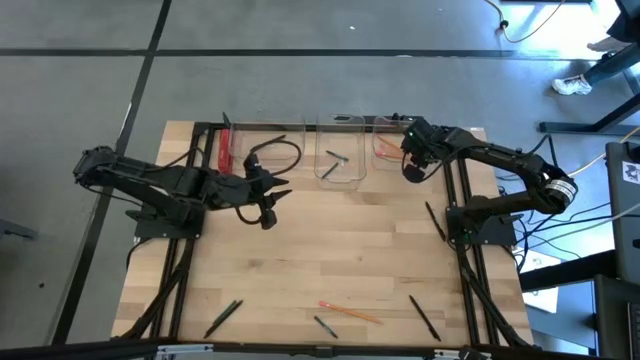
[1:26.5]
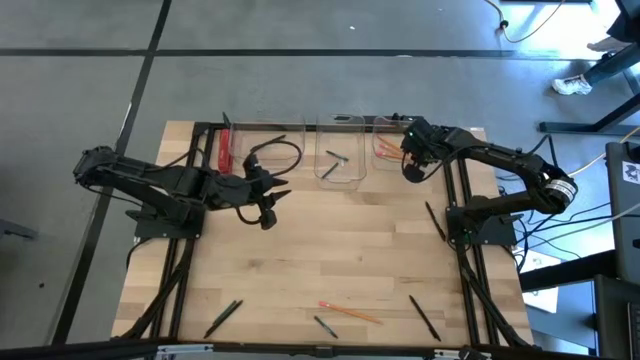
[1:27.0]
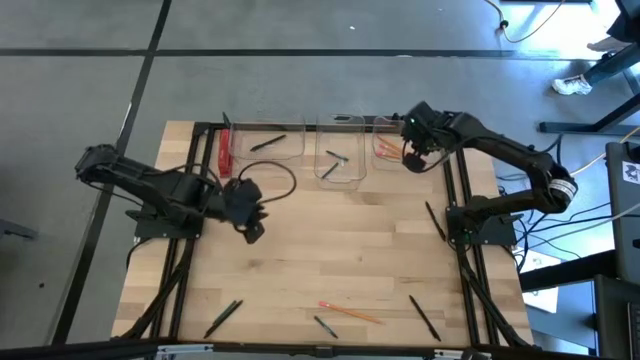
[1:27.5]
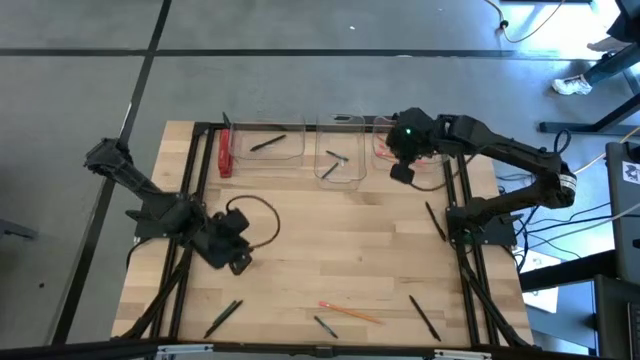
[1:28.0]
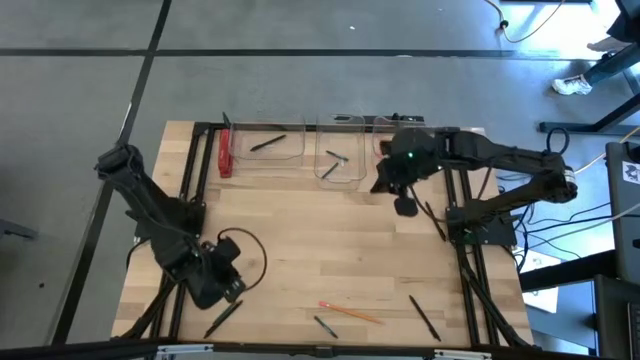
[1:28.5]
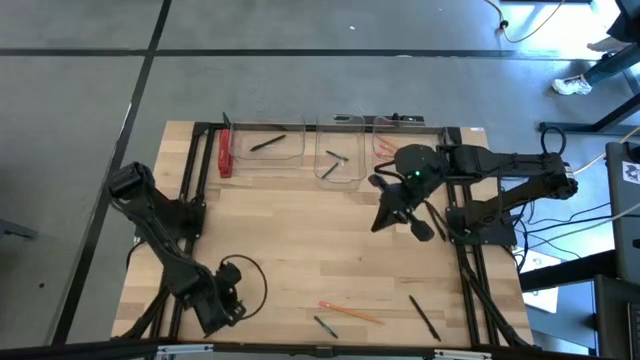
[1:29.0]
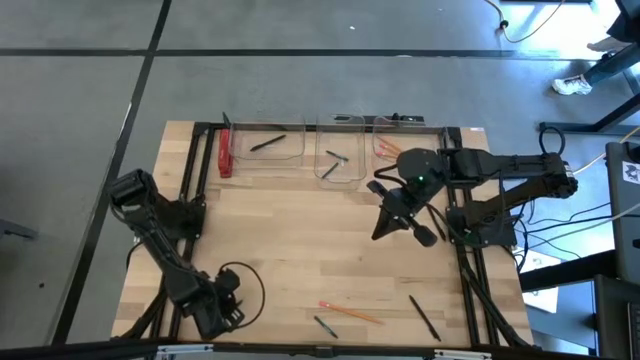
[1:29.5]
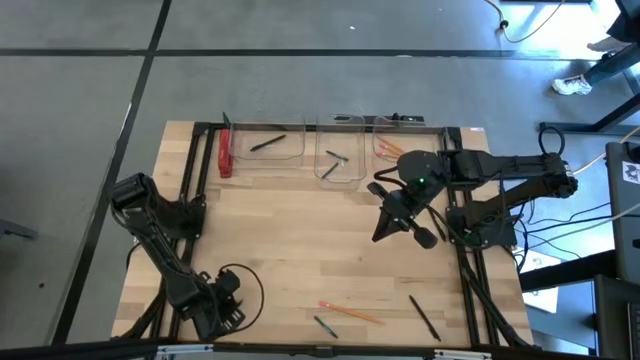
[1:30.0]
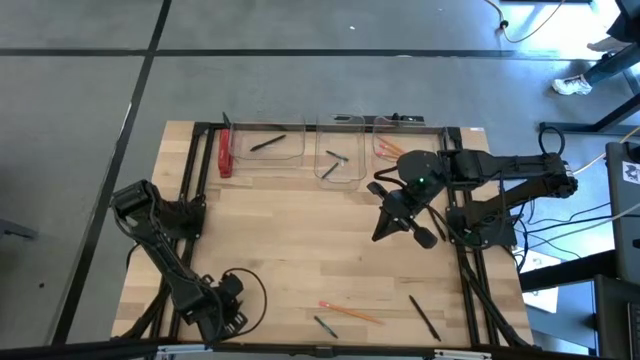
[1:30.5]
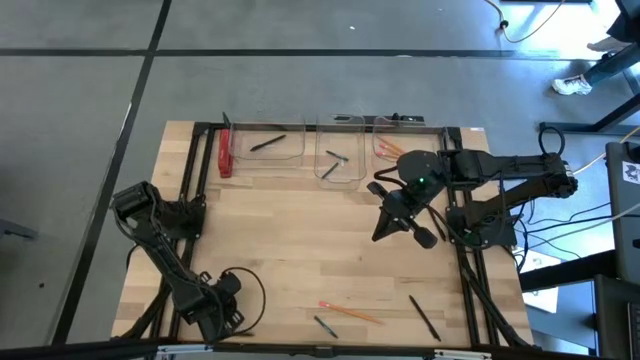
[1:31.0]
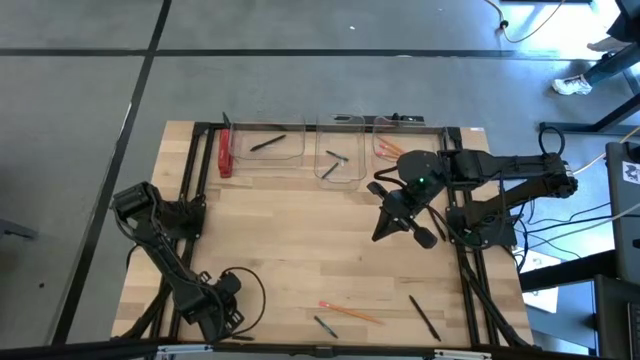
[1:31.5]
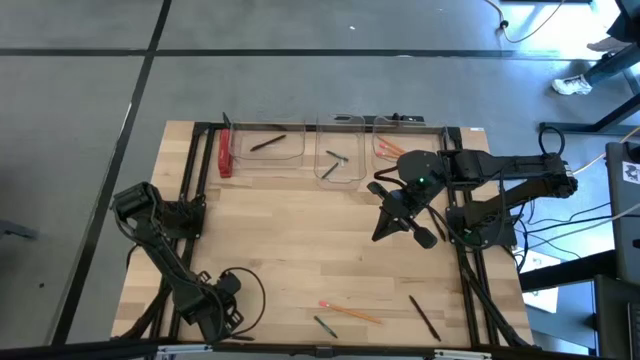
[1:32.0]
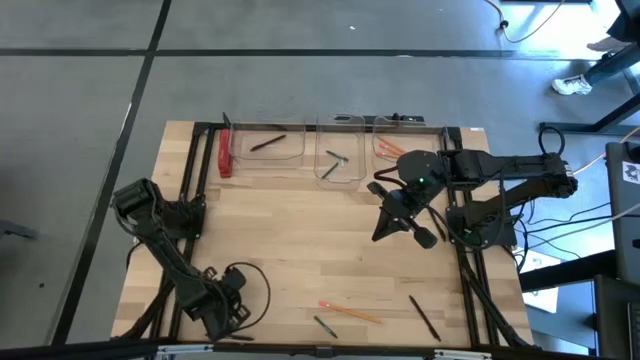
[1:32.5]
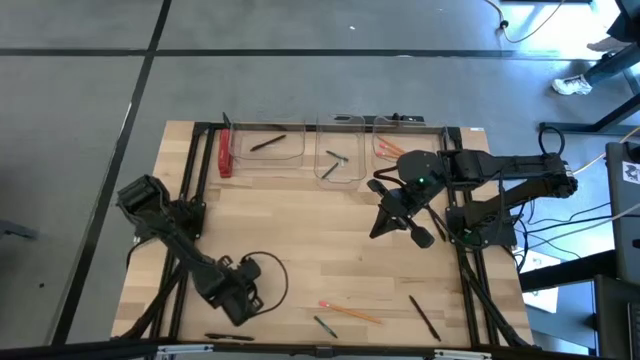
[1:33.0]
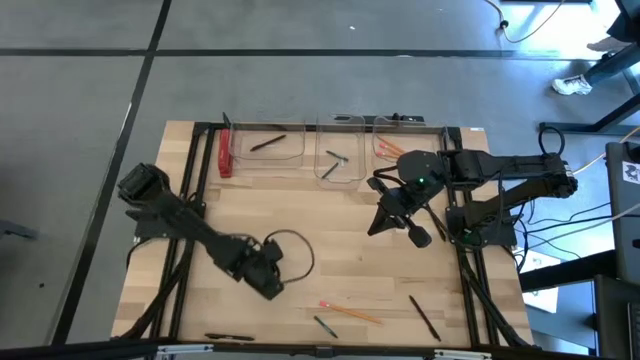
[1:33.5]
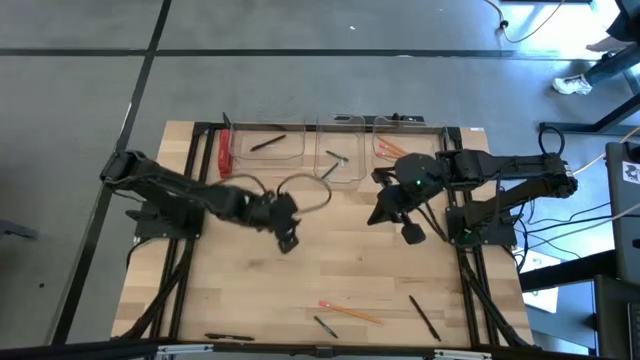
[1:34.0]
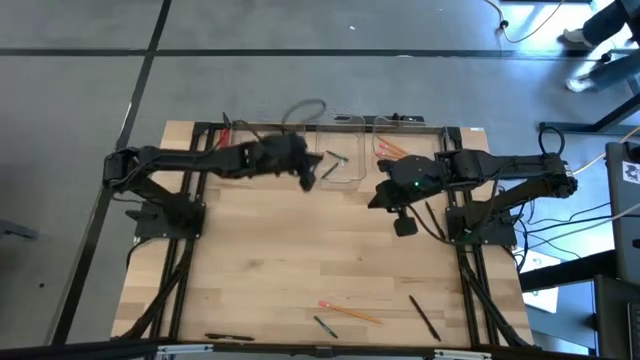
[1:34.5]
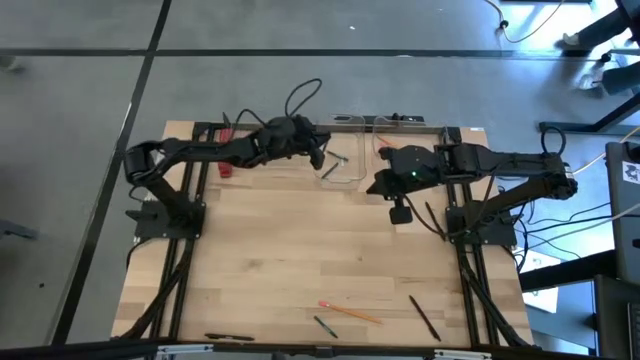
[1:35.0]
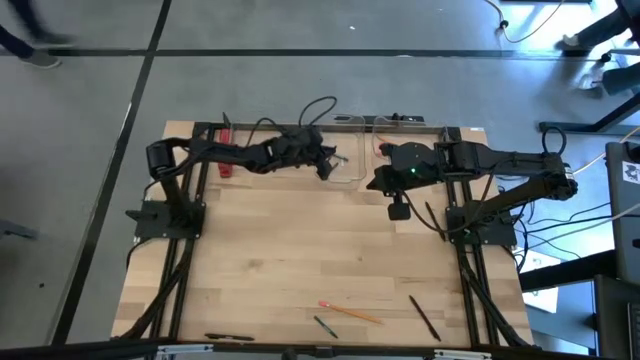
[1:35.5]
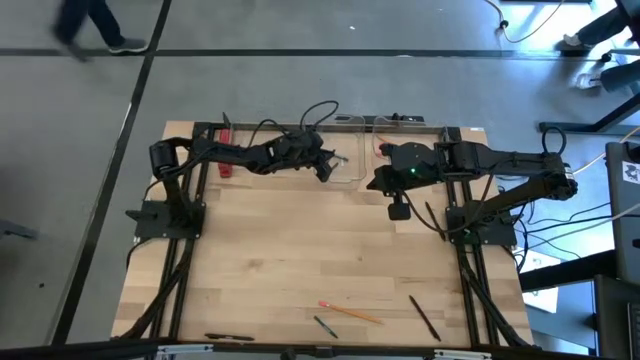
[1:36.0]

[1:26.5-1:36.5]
Task: Sort crayons/erasers/pens/pencils in bins
Put the green crayon into the middle transparent bin

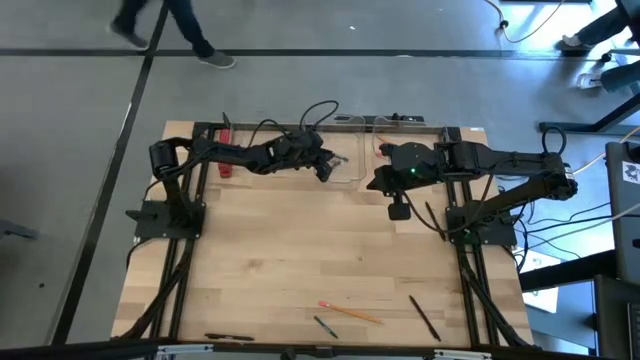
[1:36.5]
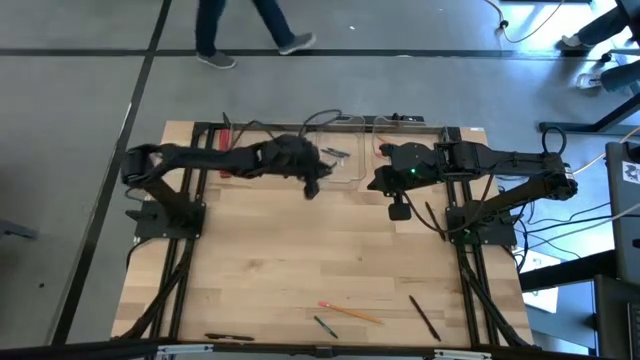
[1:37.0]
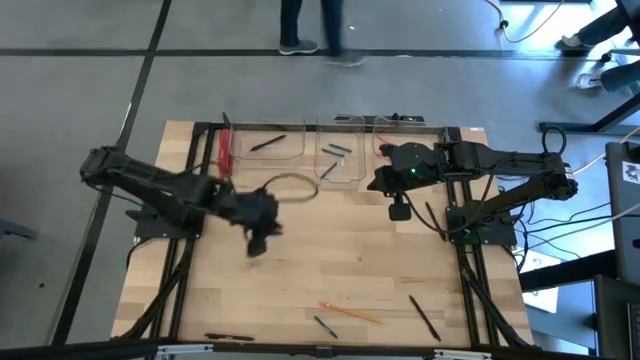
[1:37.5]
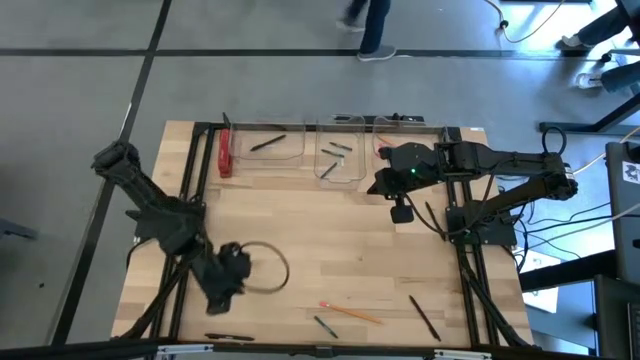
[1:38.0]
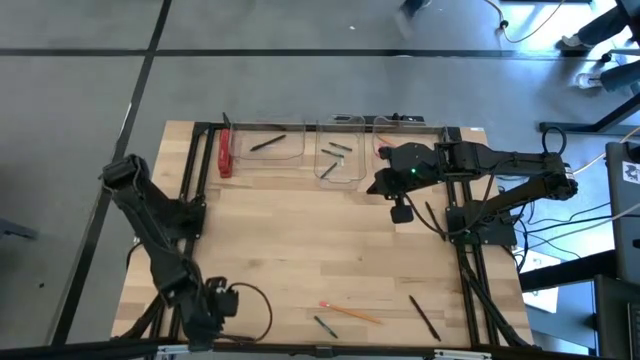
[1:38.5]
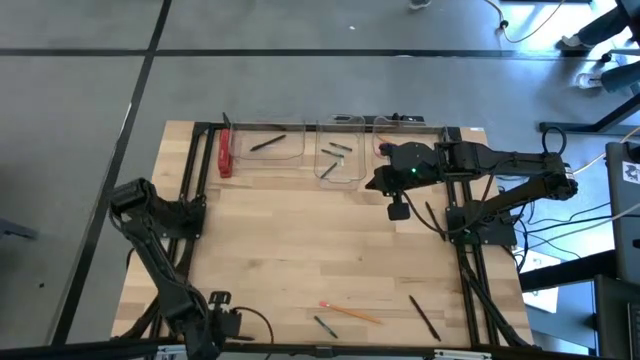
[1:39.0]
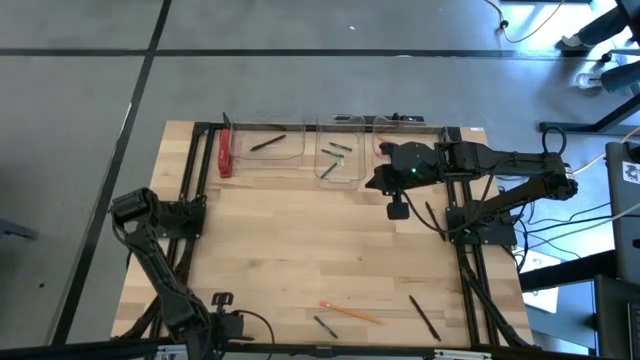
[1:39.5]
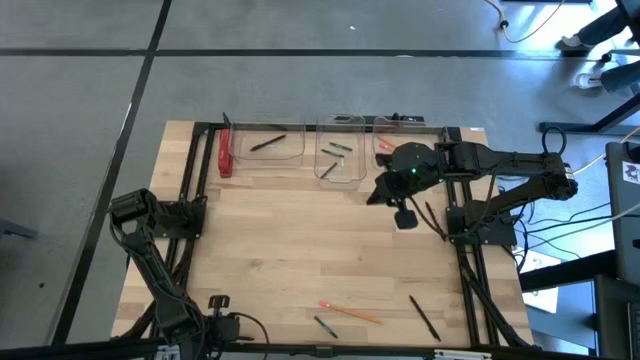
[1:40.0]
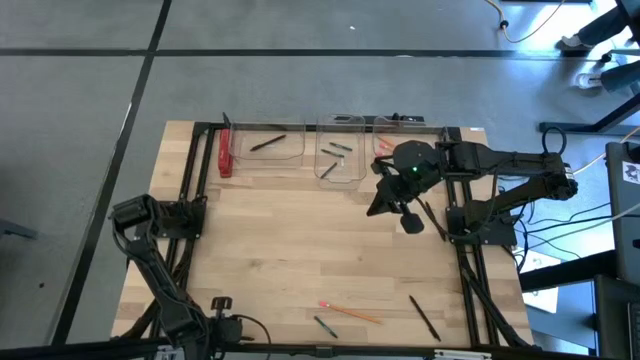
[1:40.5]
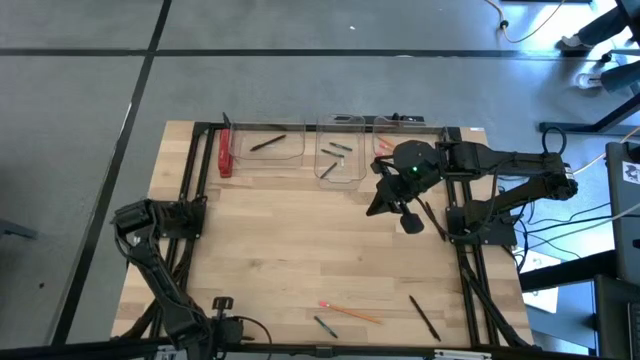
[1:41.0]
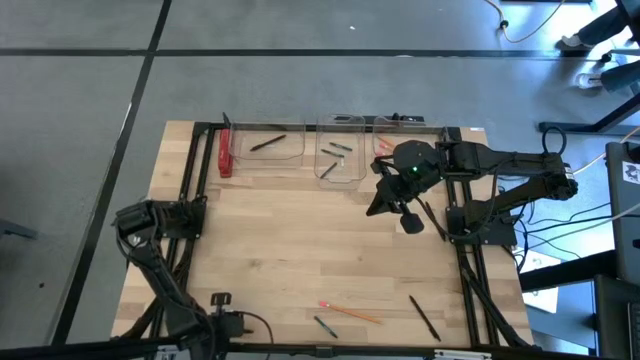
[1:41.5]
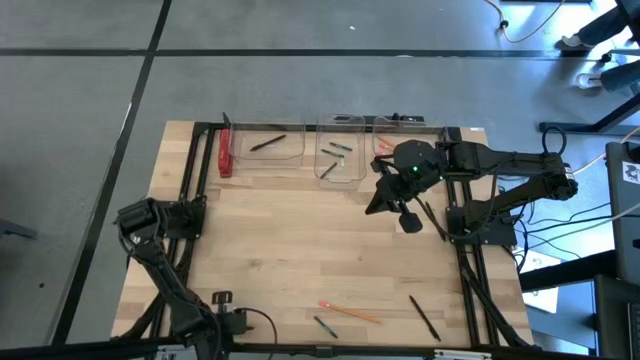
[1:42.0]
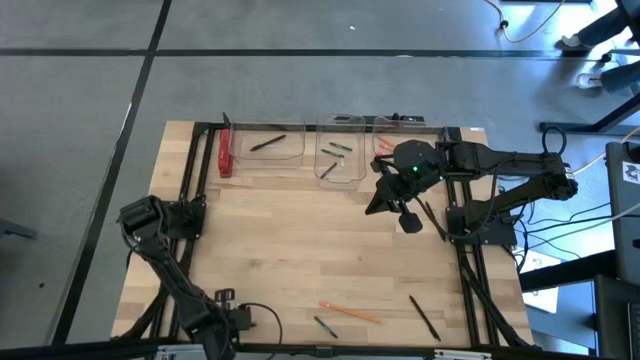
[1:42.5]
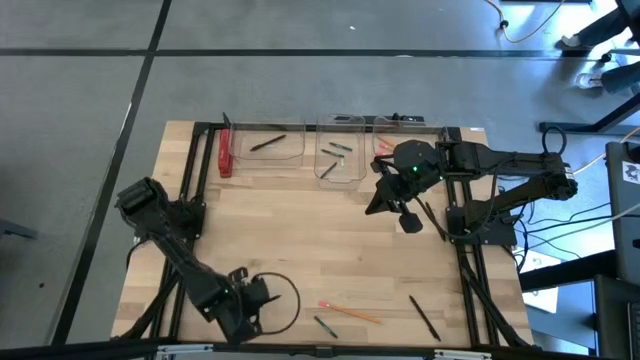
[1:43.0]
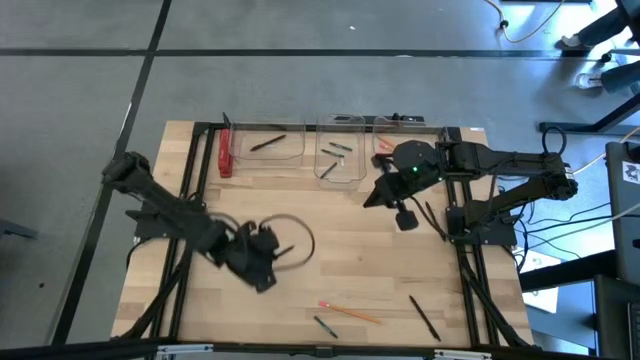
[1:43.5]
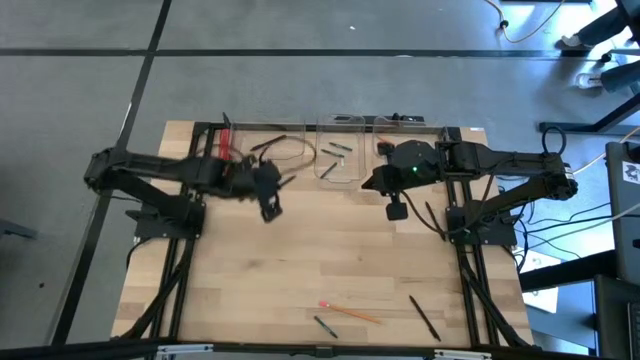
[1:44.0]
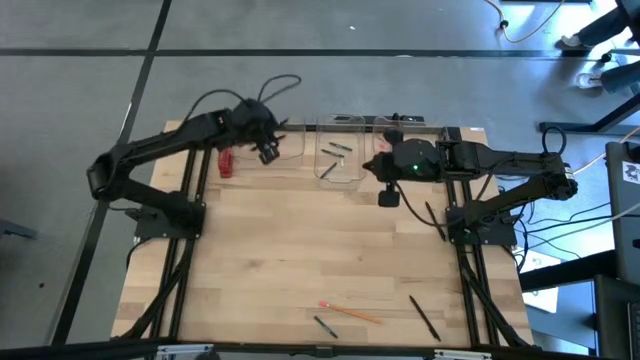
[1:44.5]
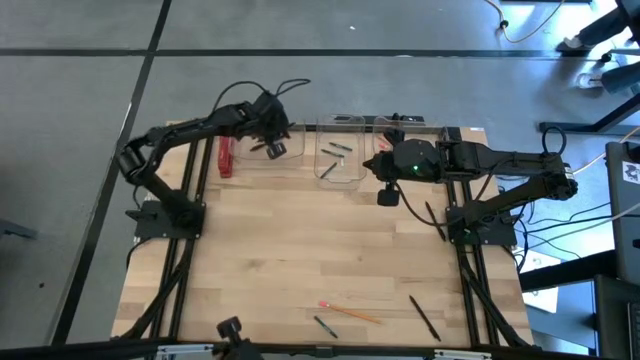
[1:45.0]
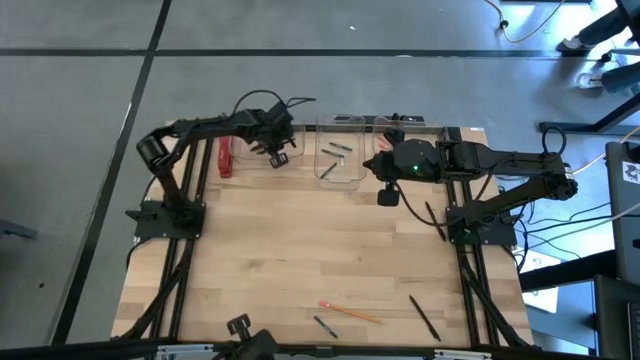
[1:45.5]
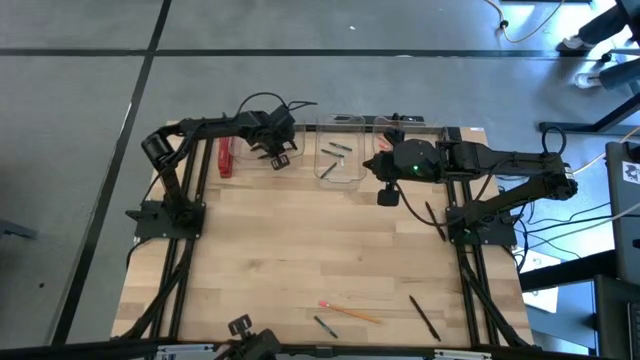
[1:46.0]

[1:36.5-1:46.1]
Put the black pen into the left transparent bin

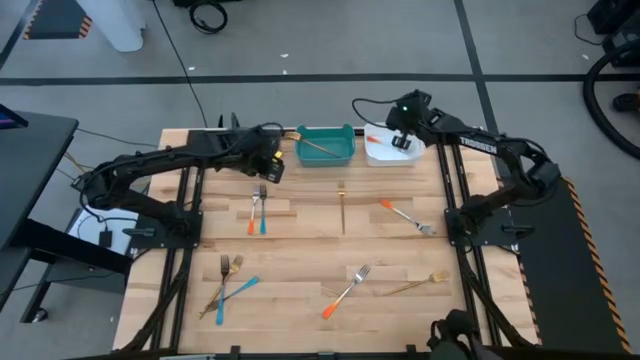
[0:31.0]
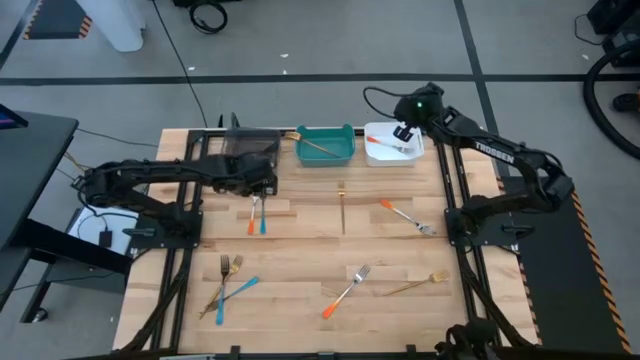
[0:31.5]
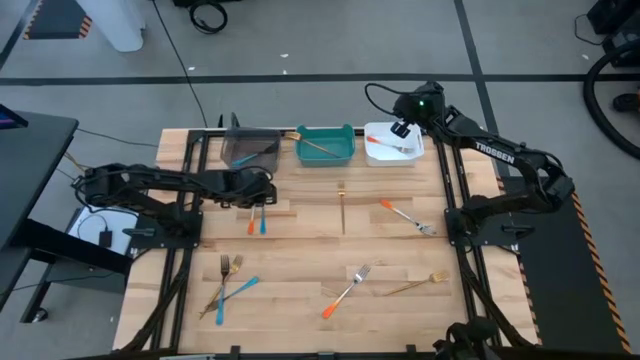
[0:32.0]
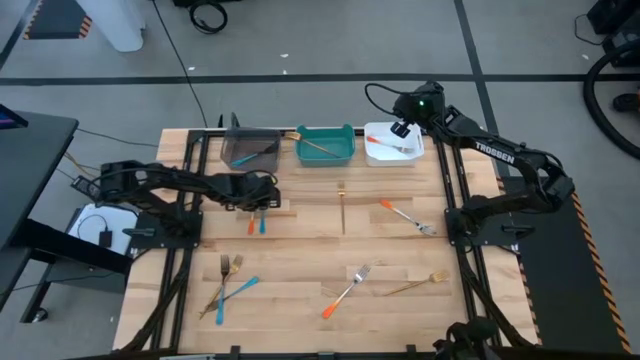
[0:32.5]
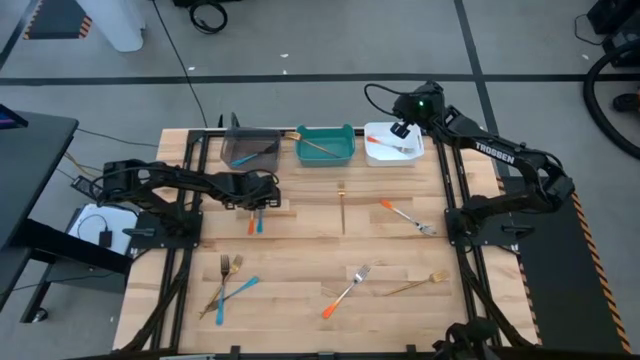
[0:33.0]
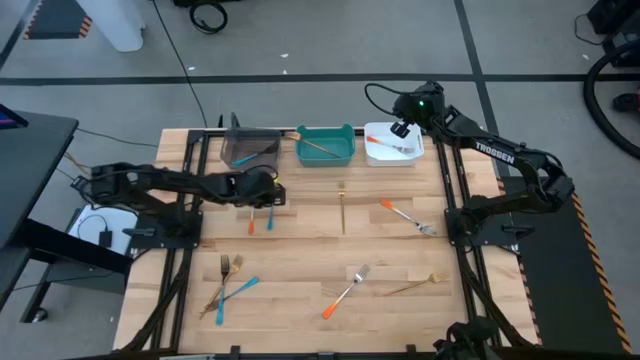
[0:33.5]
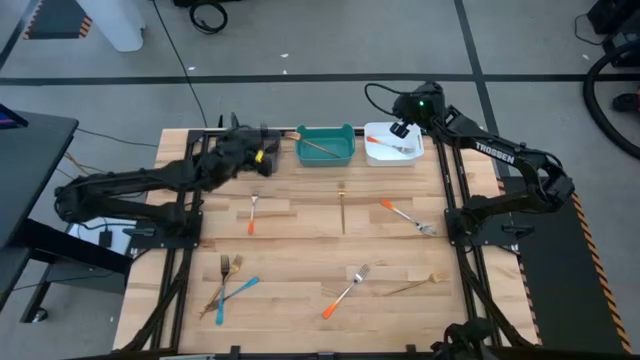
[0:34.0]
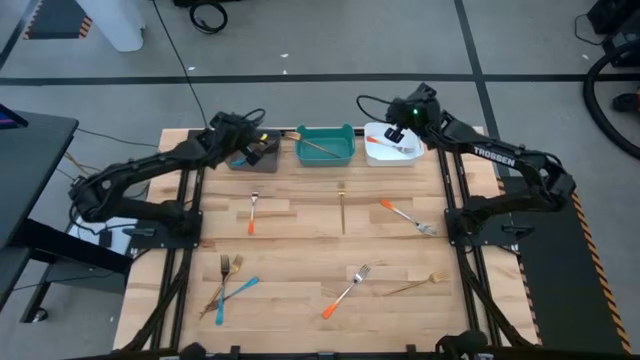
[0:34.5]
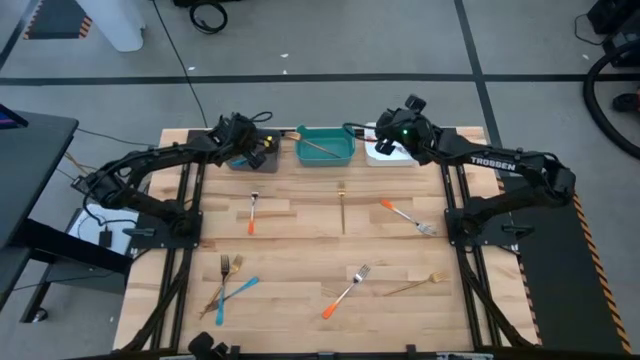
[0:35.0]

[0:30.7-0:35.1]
Task: Sort silverware by color (type)
Put the blue fork into the black transparent bin
